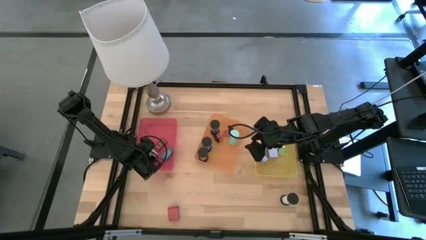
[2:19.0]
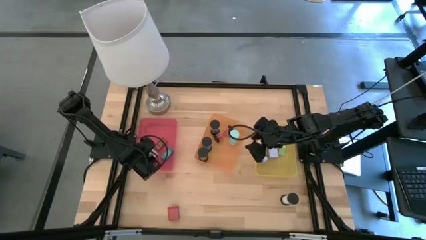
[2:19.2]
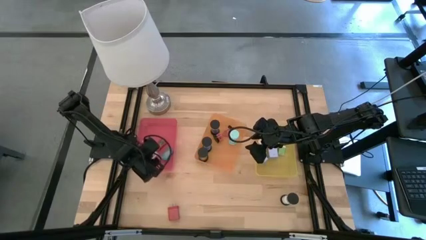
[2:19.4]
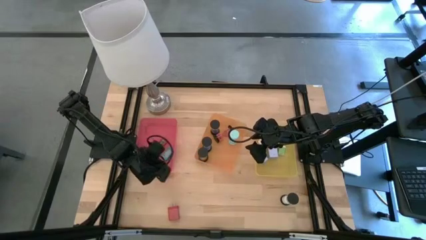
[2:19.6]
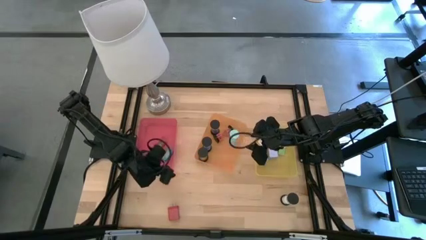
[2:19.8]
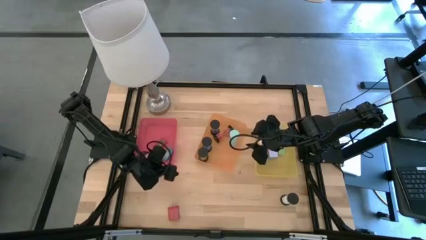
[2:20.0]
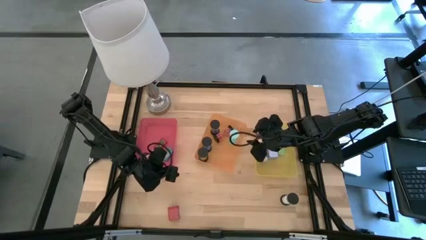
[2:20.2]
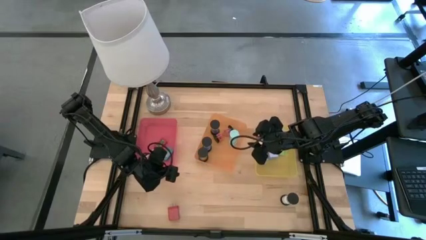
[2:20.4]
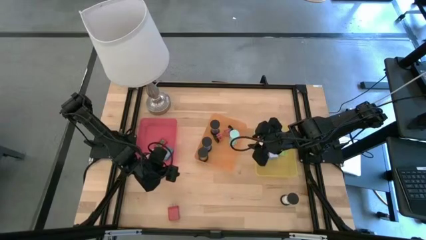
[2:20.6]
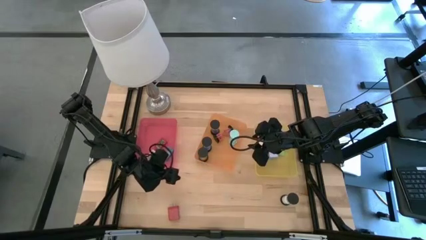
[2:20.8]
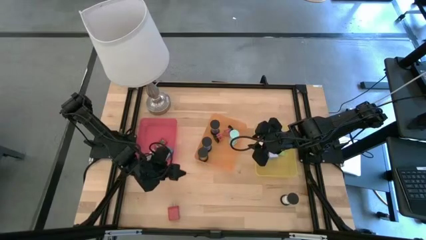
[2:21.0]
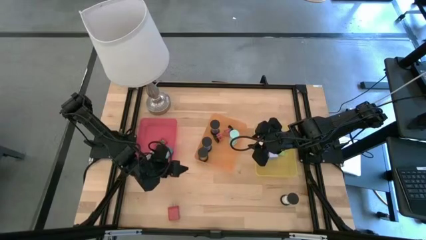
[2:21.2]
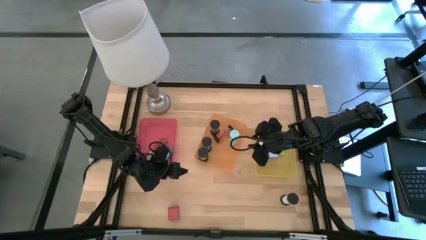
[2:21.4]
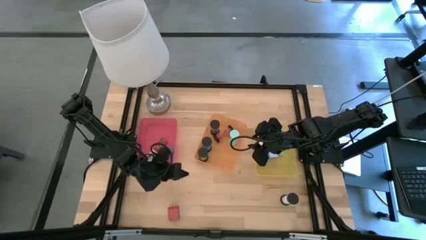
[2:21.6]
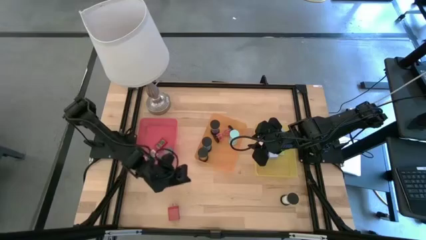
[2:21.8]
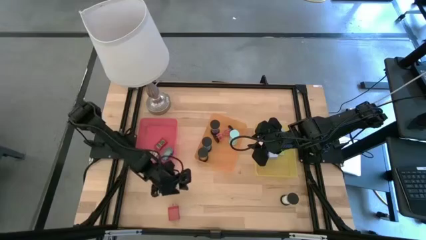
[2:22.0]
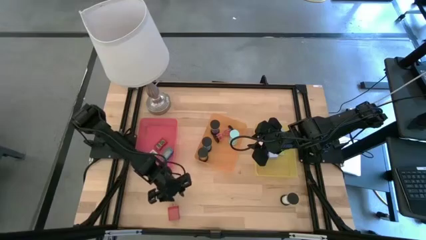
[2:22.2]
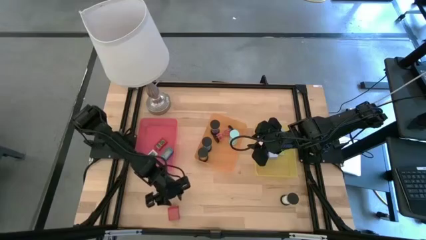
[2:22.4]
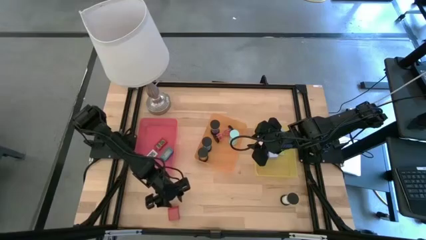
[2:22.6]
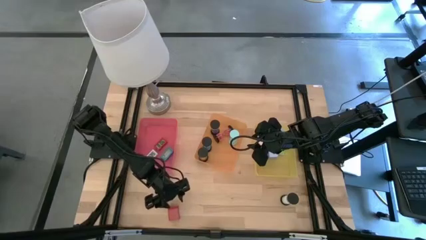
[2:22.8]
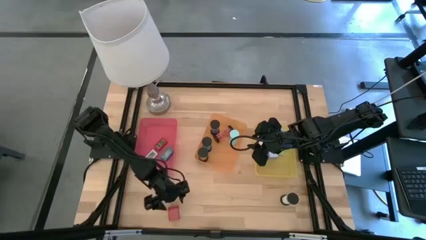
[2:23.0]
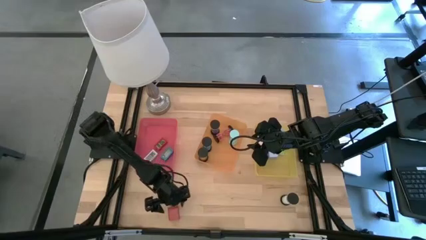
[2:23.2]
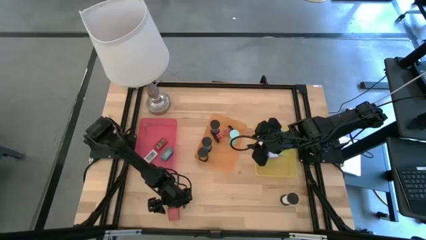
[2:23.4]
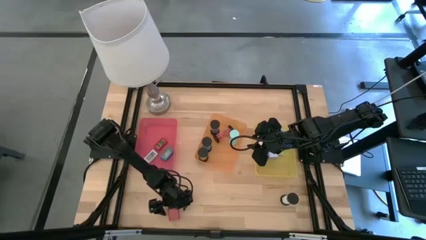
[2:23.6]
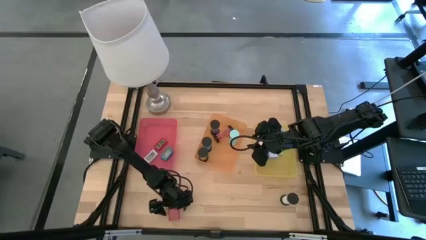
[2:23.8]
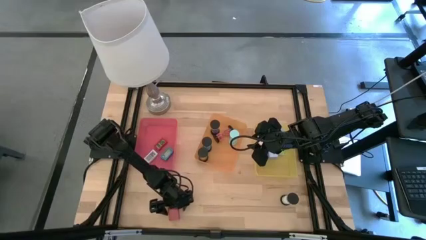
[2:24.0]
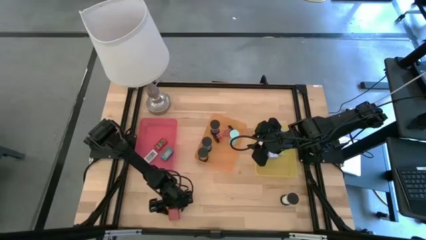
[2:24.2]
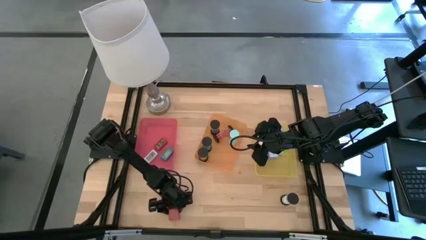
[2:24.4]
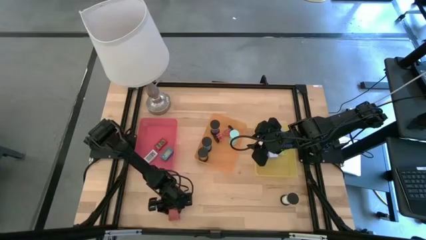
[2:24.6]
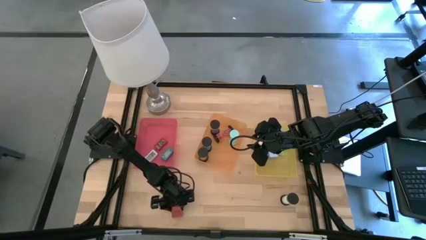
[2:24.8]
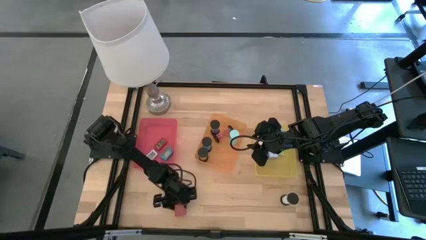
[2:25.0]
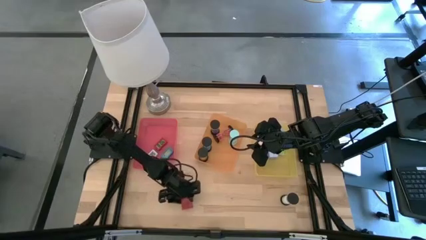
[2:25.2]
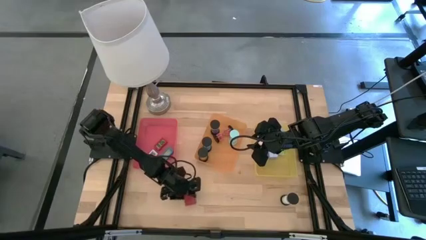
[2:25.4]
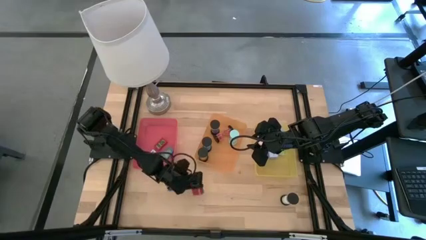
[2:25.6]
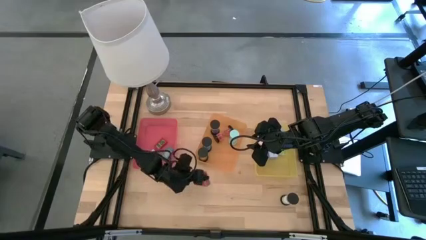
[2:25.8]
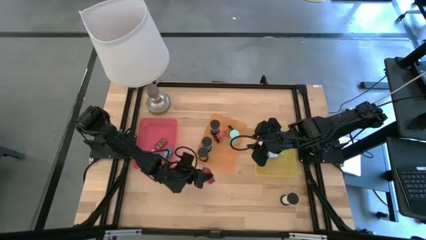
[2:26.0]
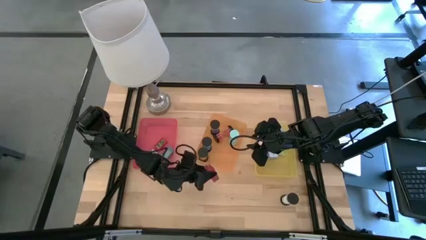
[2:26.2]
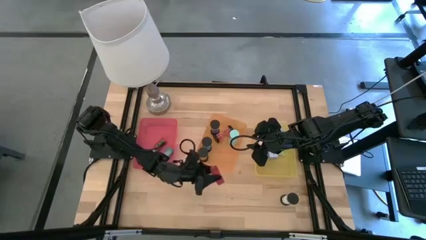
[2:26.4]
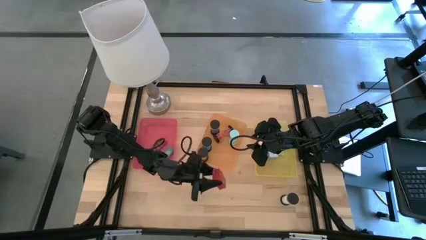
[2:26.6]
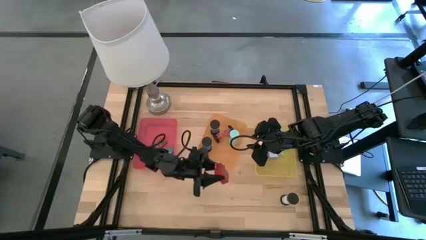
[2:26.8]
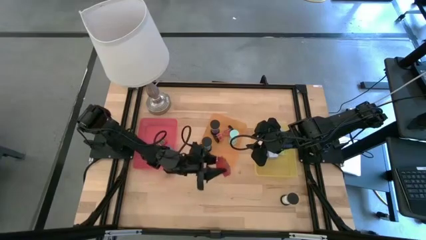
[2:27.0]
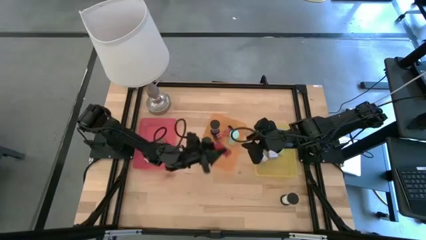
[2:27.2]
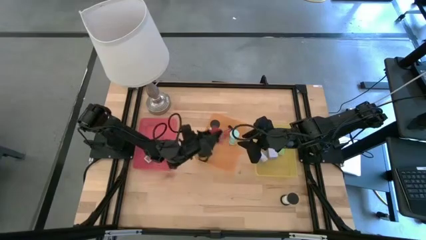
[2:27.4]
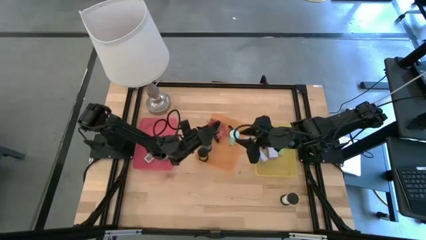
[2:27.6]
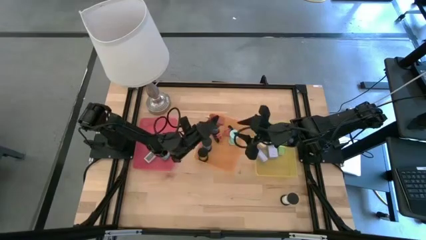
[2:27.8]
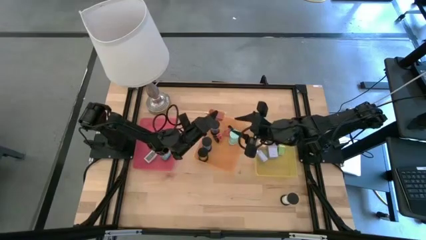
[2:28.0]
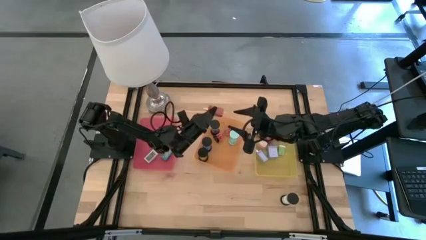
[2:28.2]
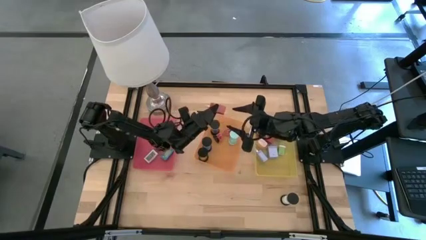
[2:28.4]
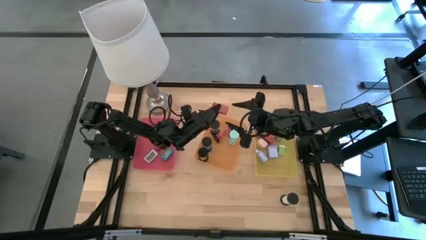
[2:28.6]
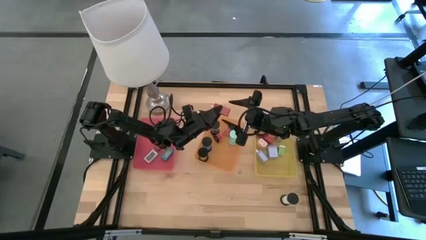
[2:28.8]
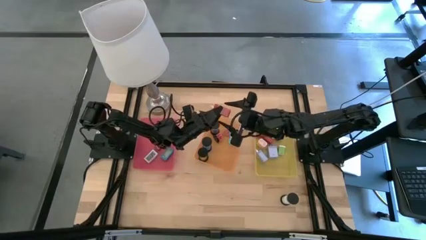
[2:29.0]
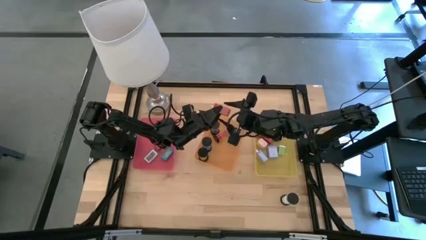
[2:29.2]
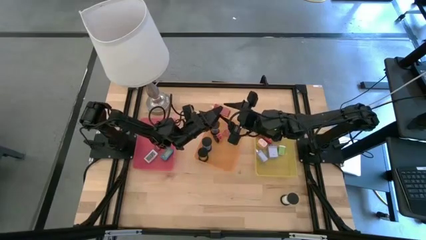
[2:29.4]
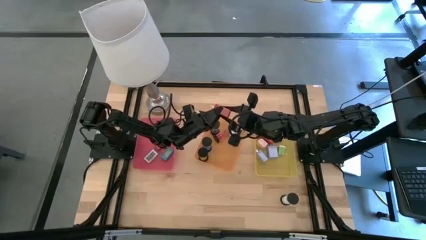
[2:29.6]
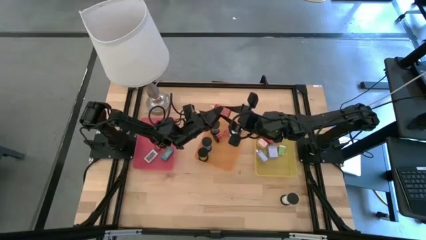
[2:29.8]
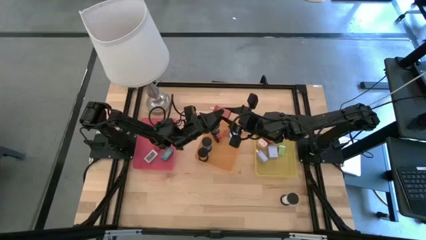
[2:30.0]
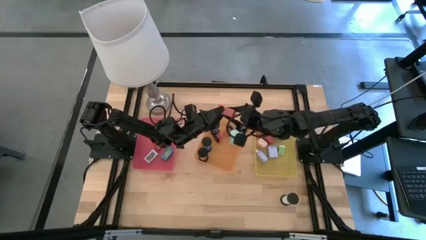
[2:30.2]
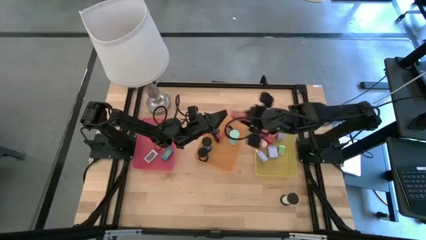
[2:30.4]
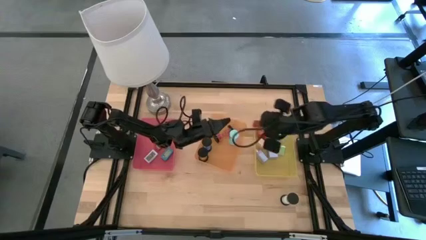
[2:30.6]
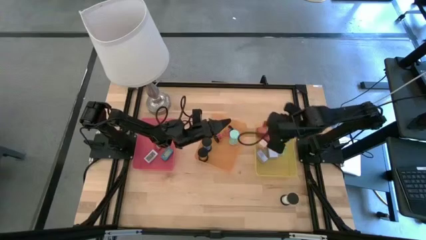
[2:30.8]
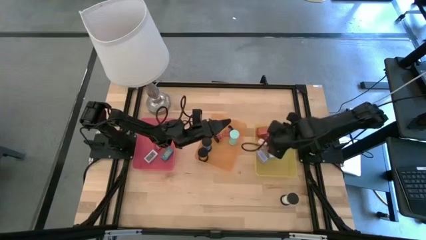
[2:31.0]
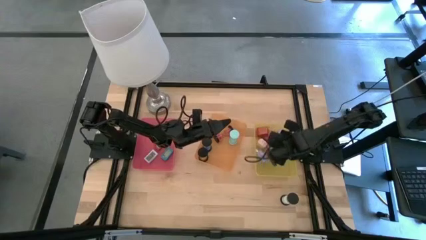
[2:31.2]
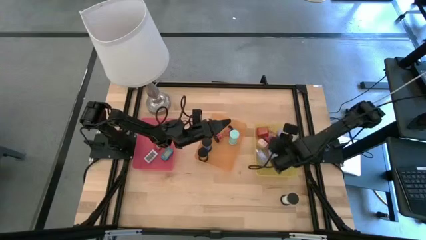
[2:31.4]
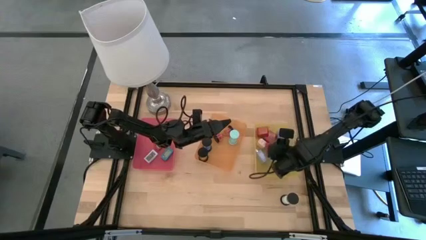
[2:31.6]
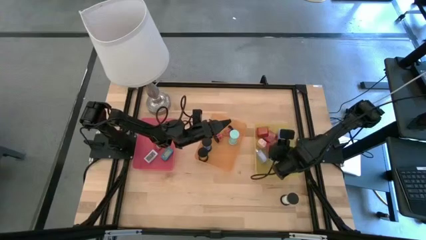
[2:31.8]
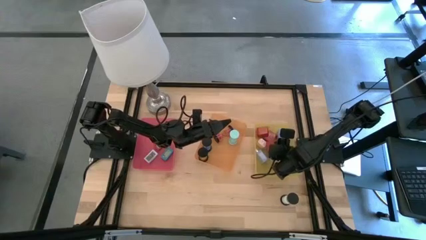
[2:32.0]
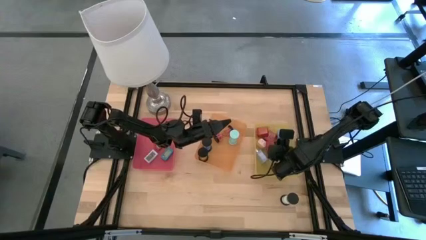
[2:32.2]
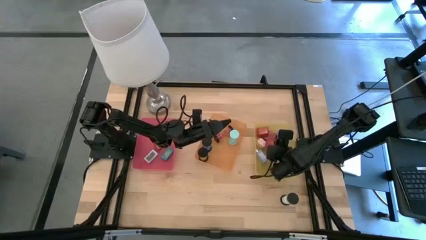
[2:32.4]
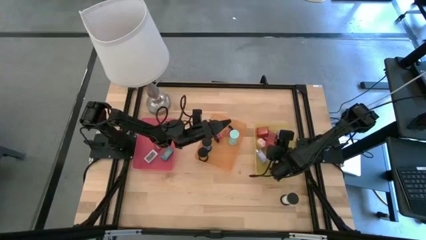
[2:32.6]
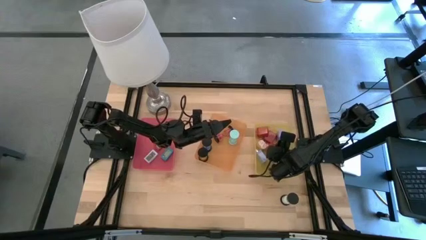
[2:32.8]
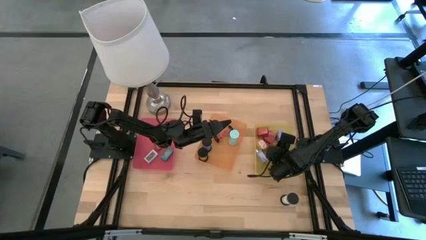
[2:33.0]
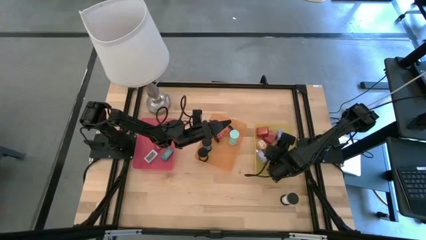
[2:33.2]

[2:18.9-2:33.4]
Task: Pick & Place Office items
Put the red charger adapter into the yellow bin
